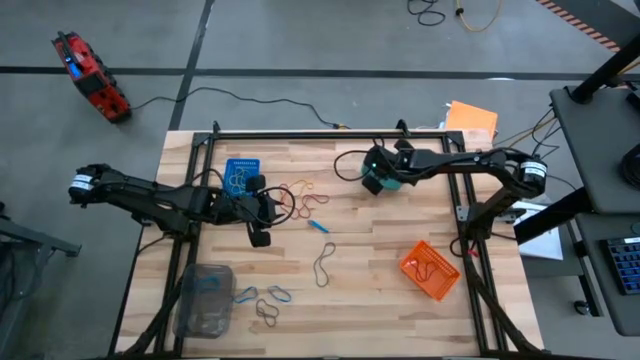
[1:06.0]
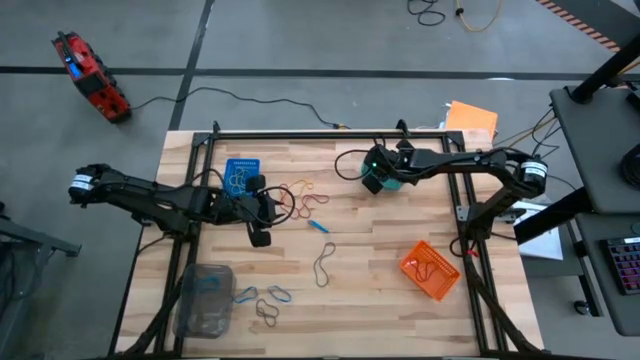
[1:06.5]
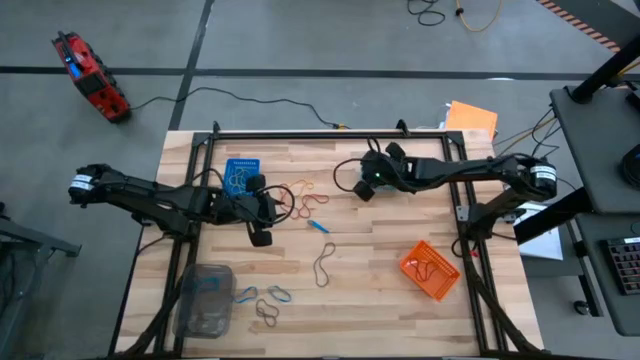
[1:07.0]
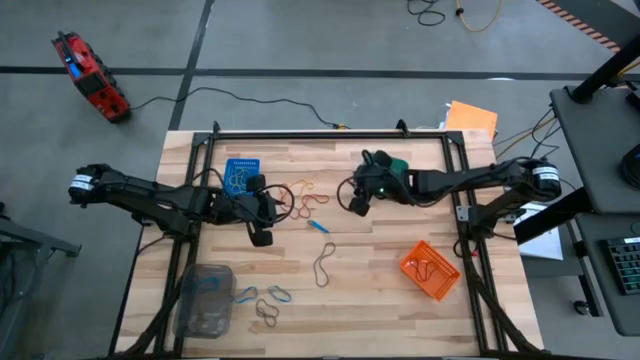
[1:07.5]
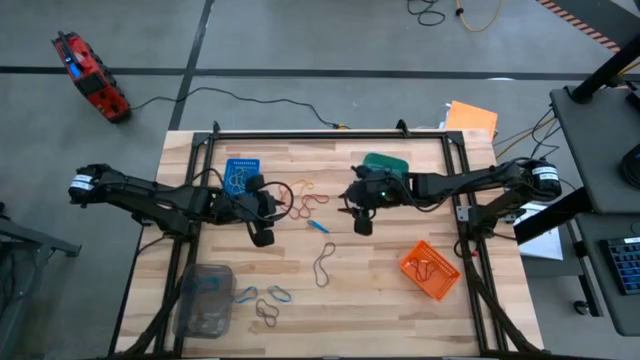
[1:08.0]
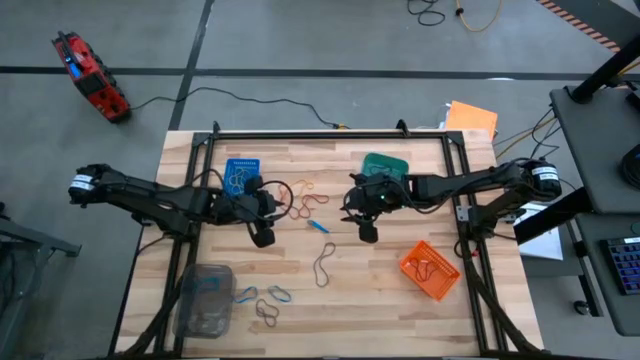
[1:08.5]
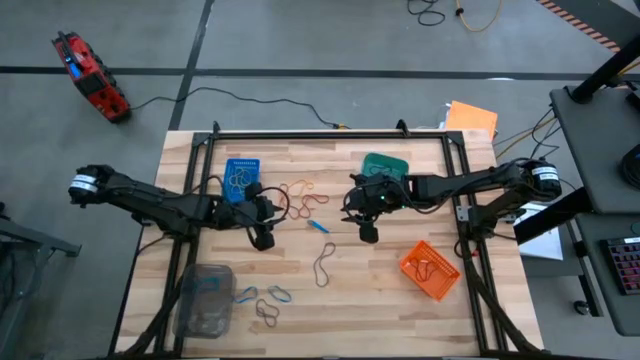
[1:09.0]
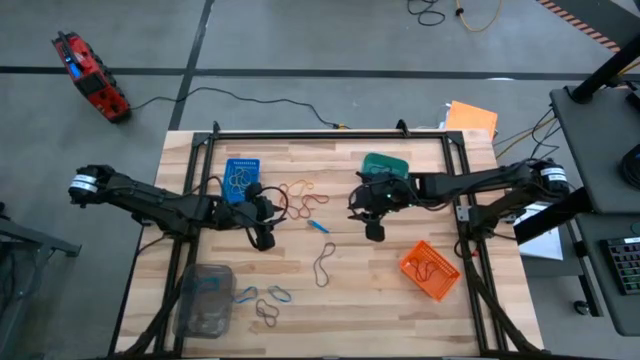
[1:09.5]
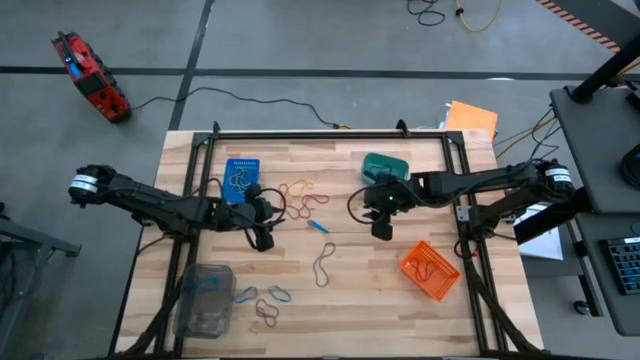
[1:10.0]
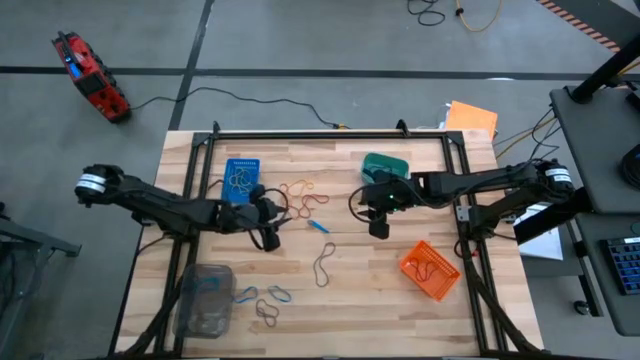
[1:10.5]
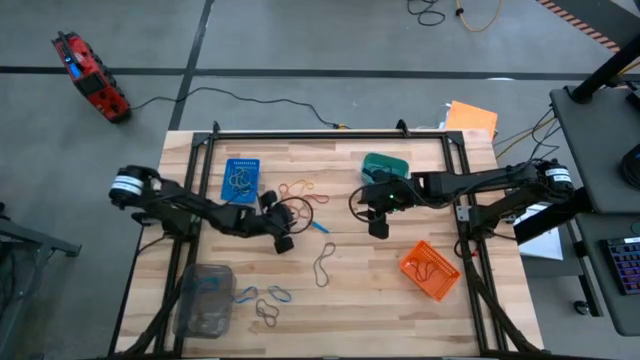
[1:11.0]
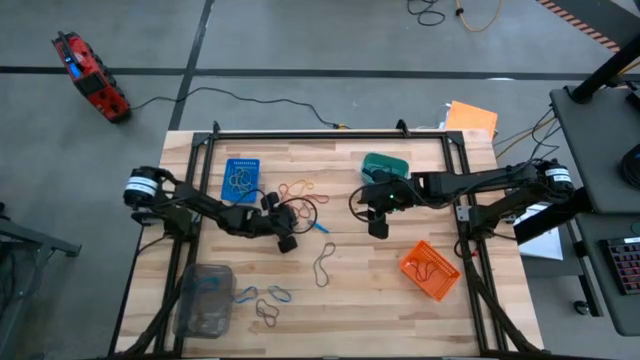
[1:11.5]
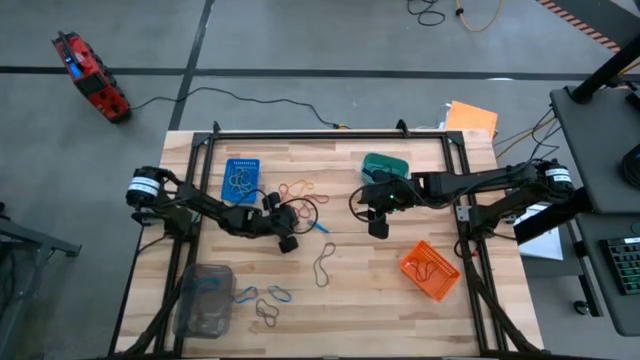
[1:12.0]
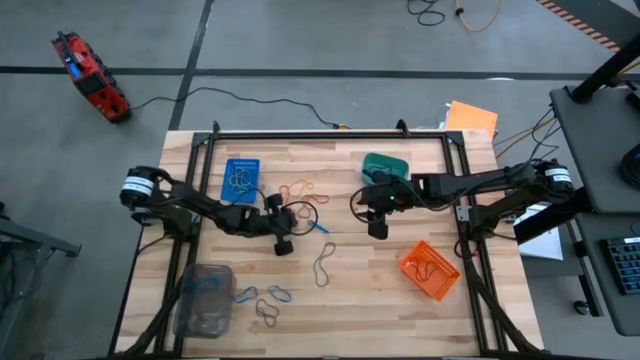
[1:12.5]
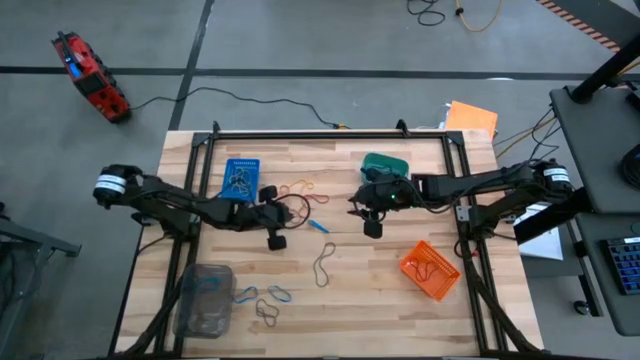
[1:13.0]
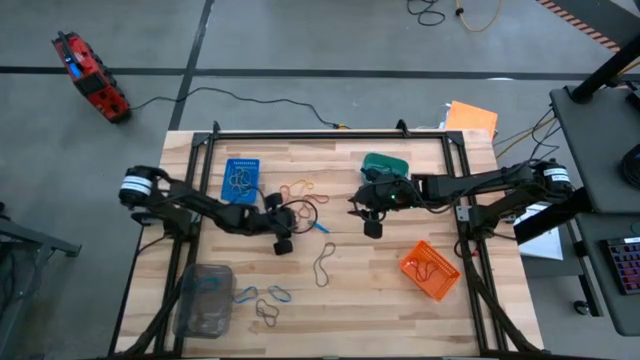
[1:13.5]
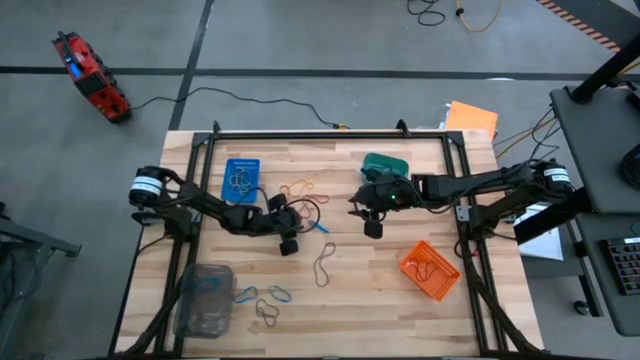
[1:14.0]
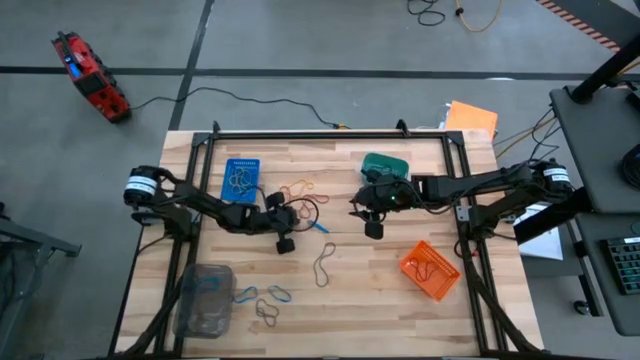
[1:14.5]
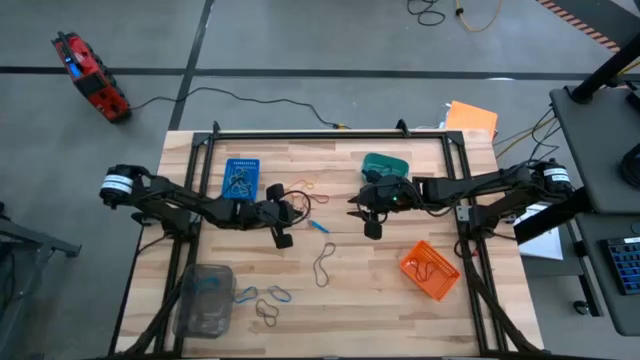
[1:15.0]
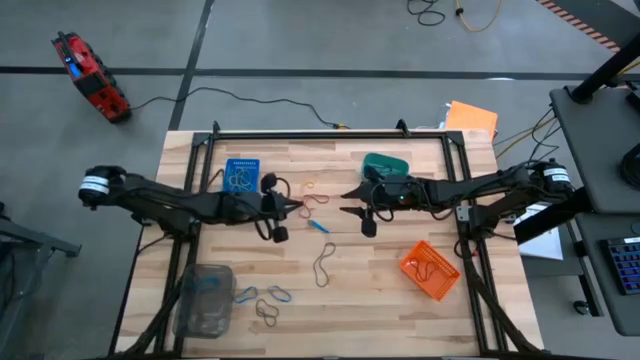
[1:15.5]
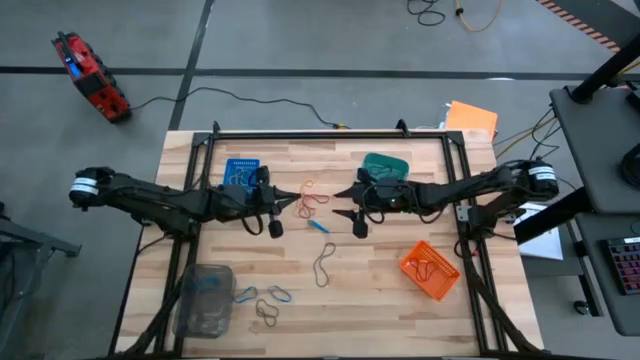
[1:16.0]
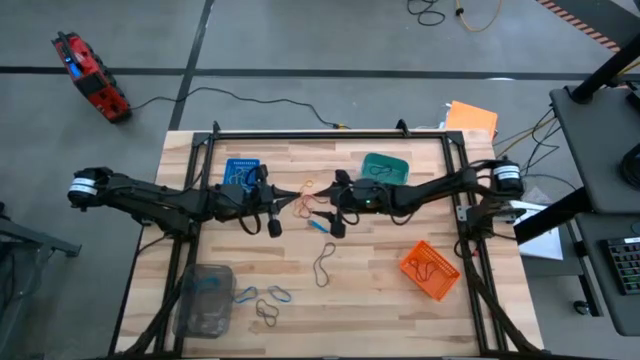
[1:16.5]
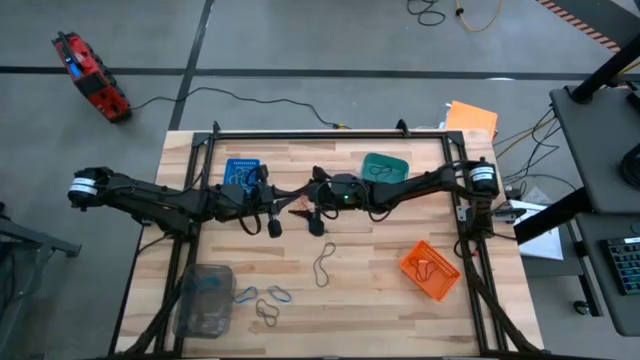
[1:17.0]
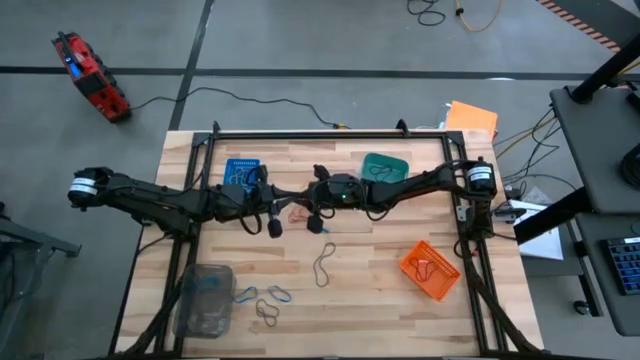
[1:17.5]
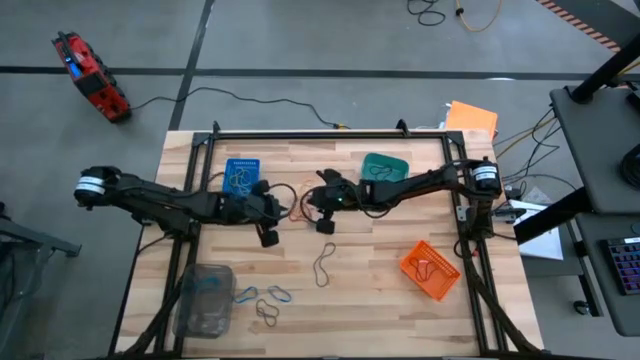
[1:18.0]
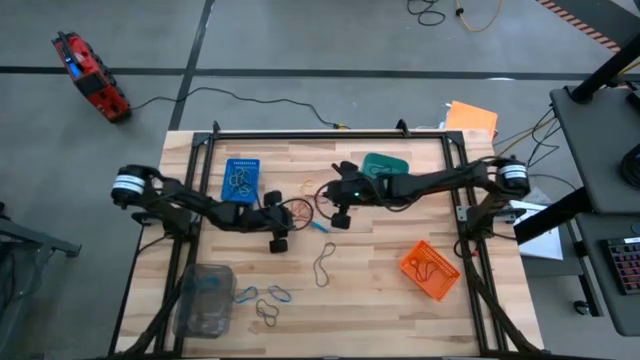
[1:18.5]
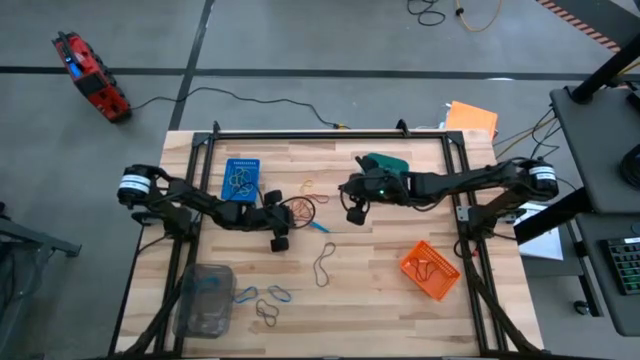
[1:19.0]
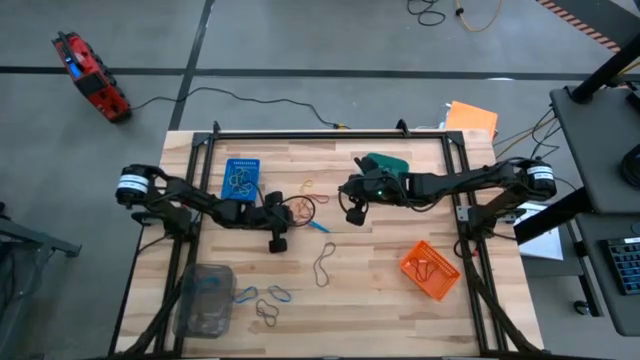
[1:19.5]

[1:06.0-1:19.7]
Task: Sort rubber bands into baskets
Put the red rubberband into the orange bin

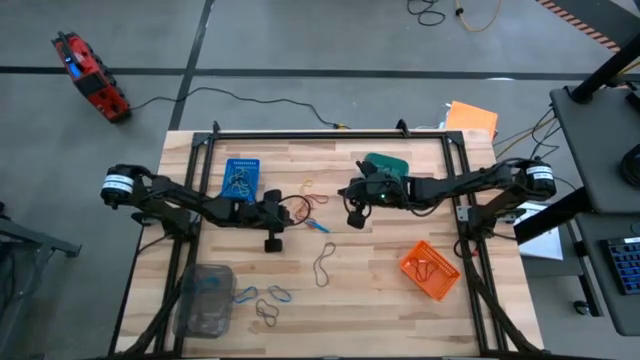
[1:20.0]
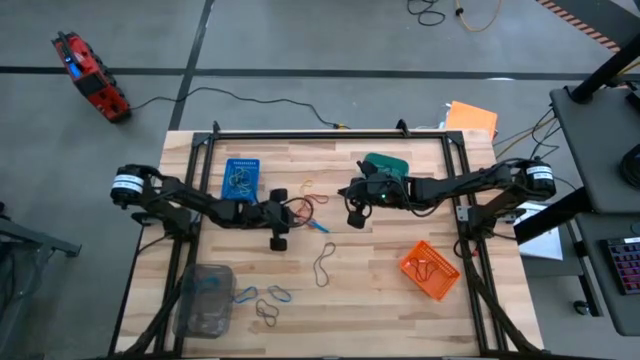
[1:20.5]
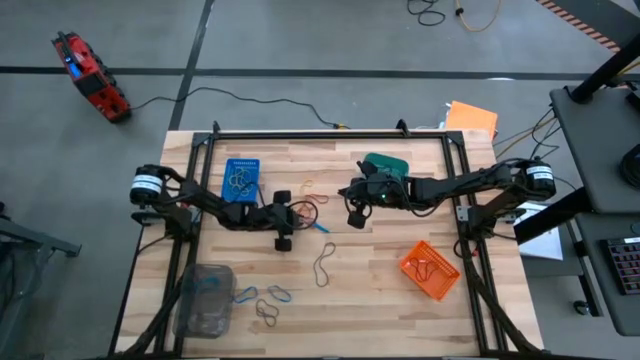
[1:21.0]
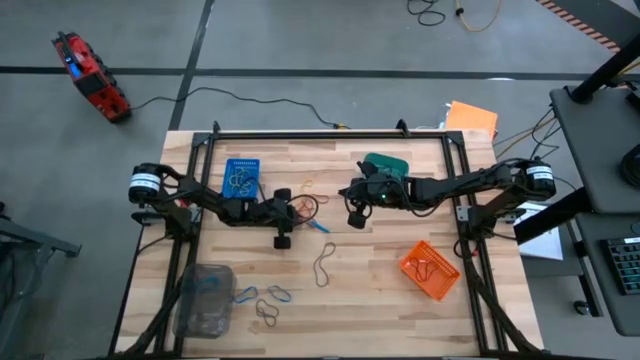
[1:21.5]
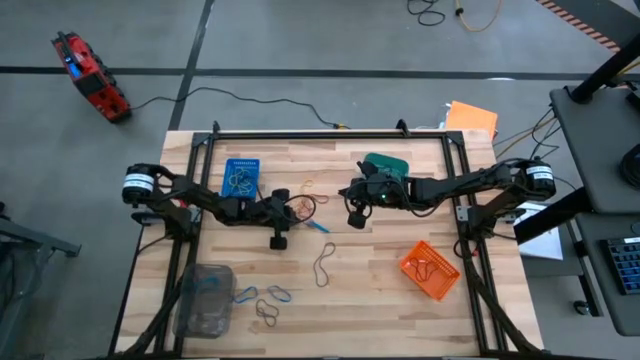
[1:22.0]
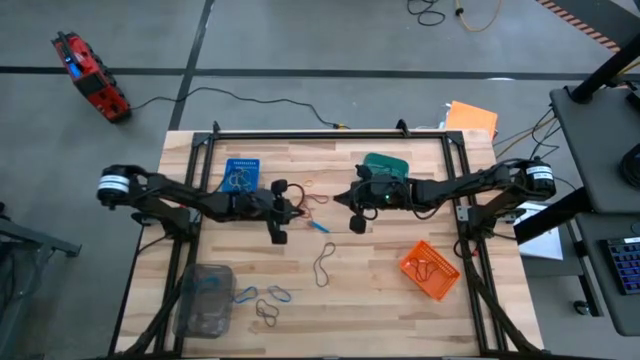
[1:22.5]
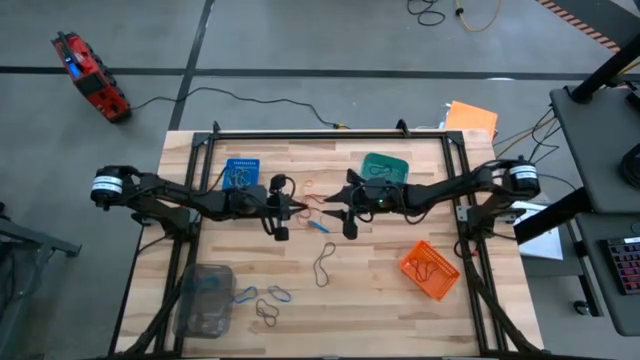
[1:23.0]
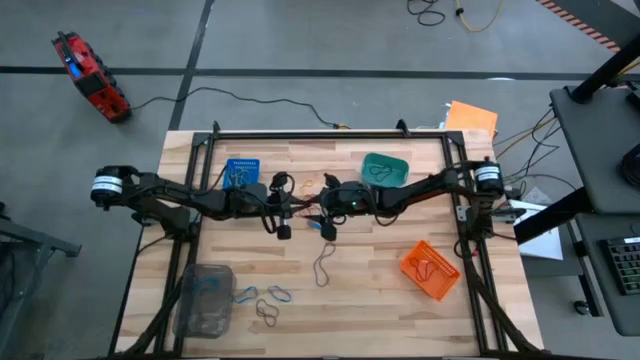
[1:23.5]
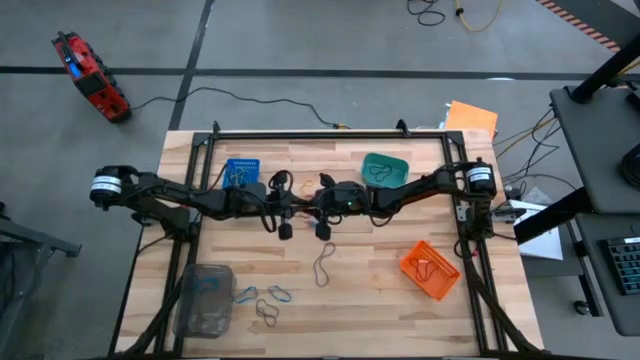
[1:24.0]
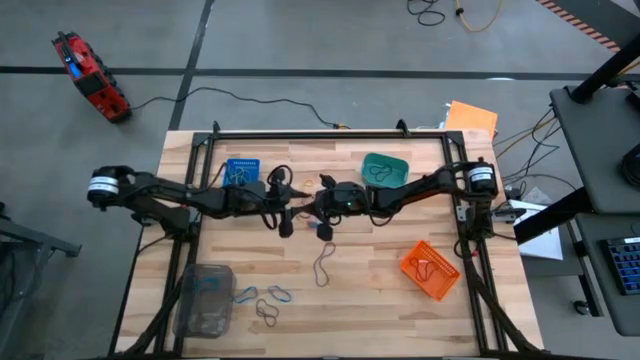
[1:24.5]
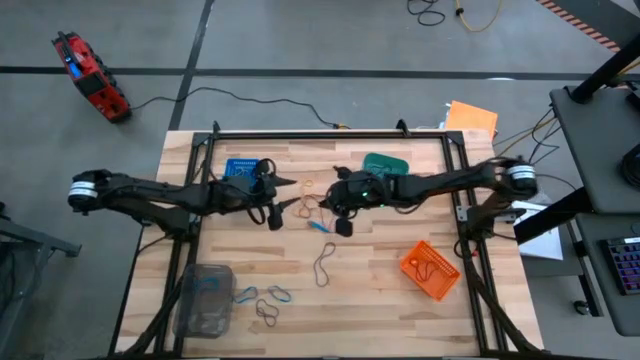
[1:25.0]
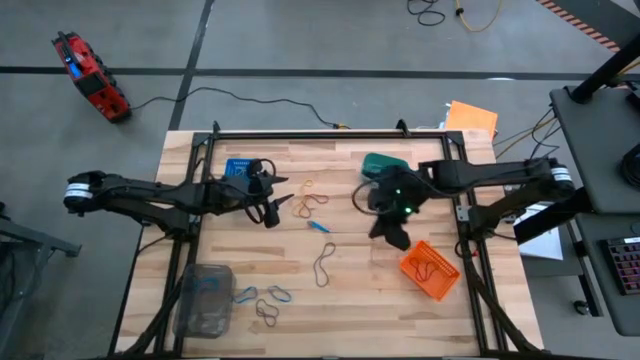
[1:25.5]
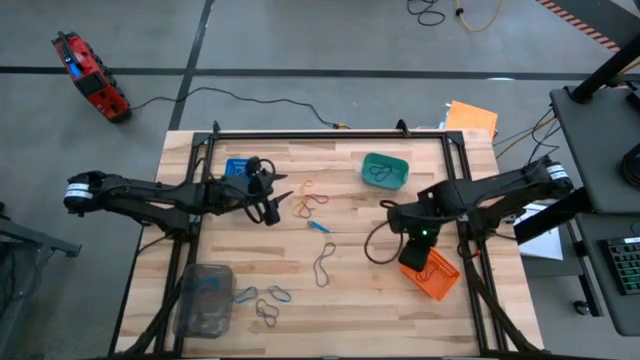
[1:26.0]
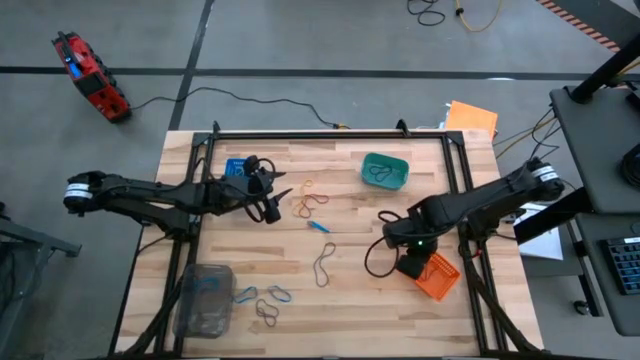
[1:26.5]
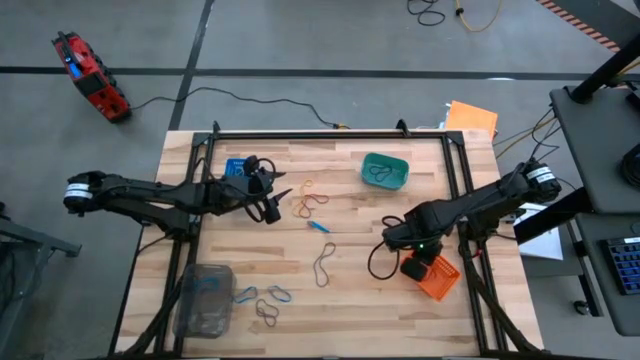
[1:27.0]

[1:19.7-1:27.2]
Put the red rubberband into the orange bin
